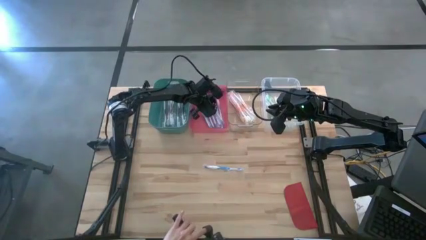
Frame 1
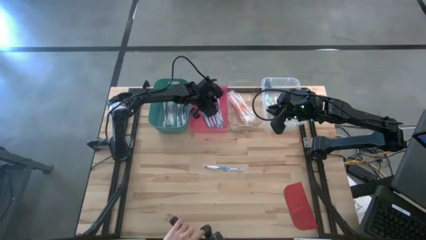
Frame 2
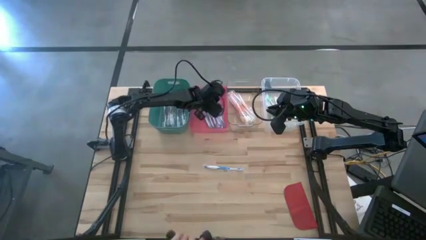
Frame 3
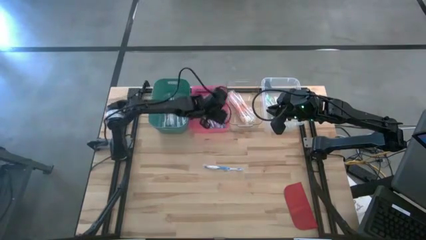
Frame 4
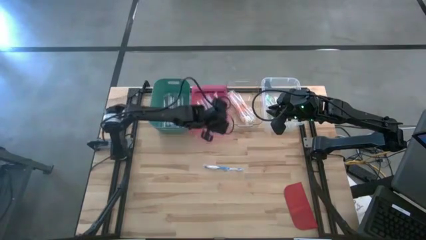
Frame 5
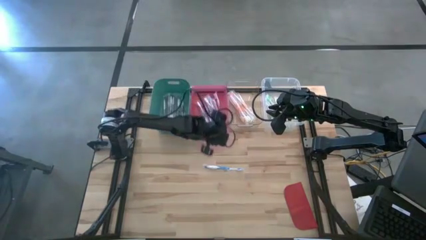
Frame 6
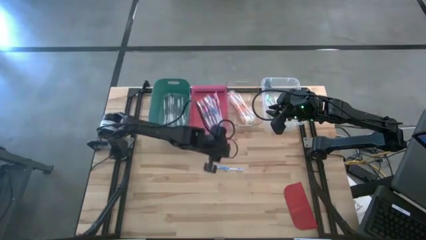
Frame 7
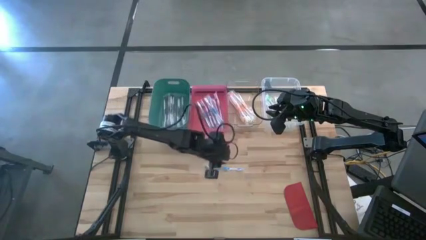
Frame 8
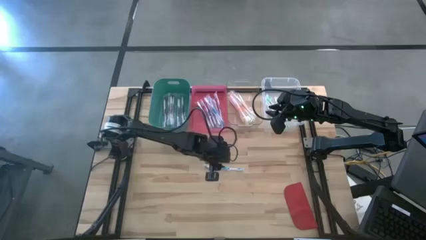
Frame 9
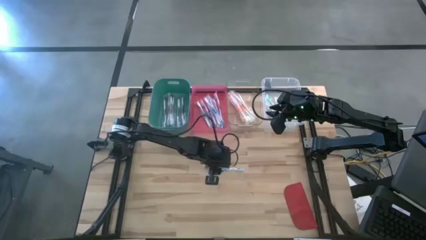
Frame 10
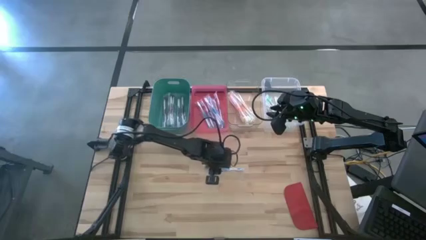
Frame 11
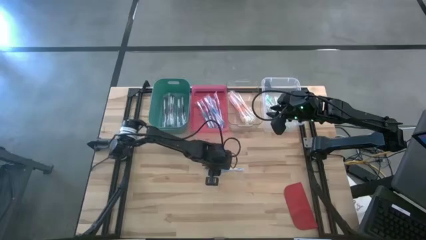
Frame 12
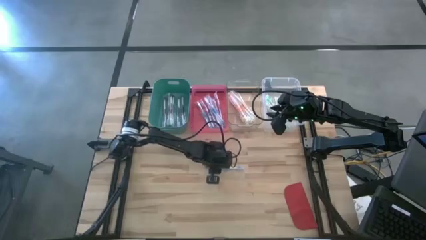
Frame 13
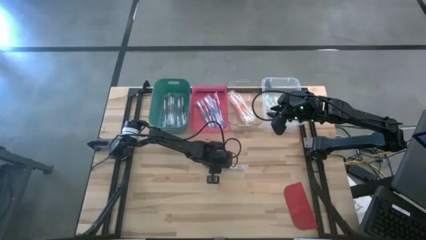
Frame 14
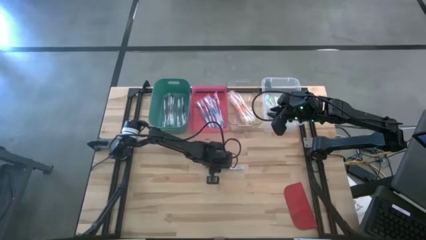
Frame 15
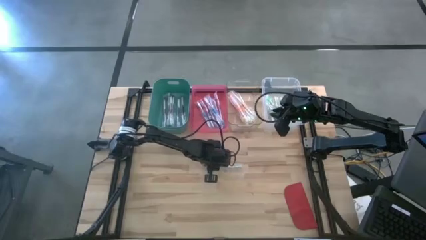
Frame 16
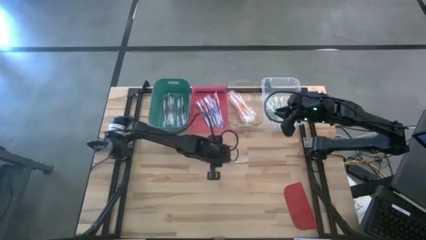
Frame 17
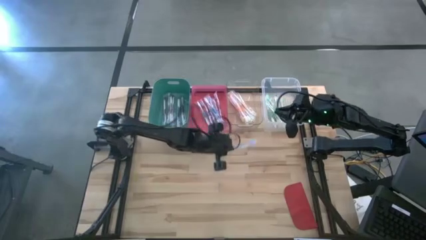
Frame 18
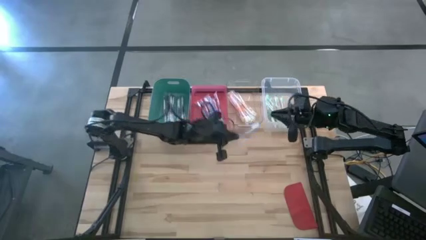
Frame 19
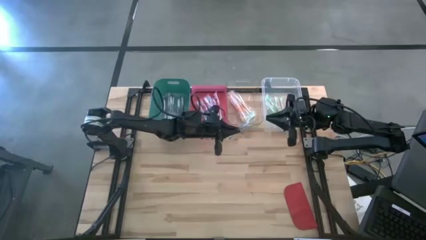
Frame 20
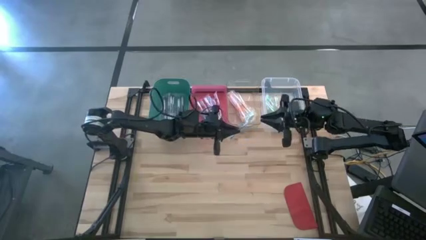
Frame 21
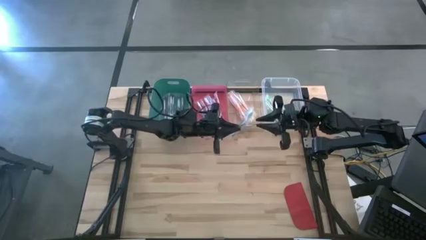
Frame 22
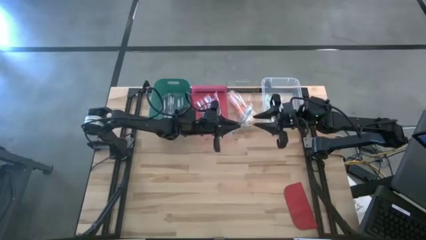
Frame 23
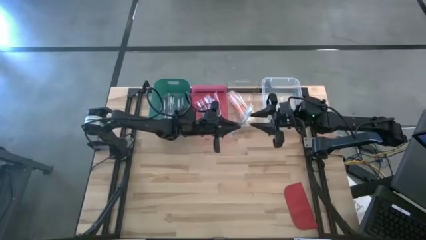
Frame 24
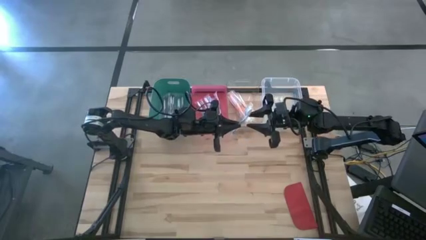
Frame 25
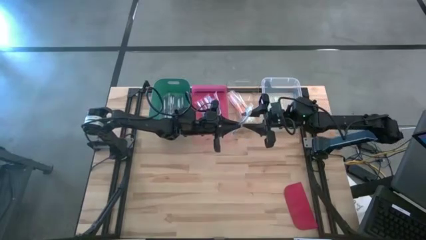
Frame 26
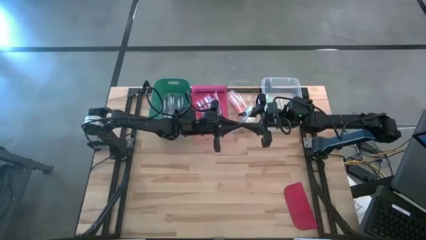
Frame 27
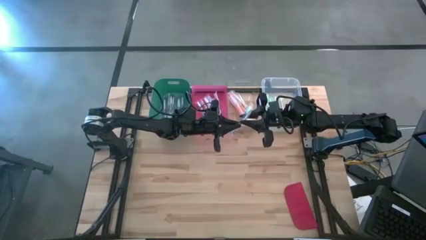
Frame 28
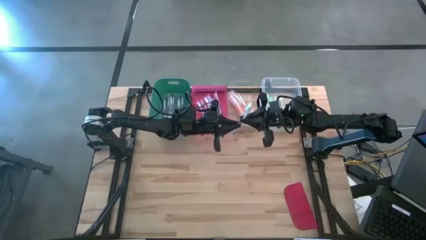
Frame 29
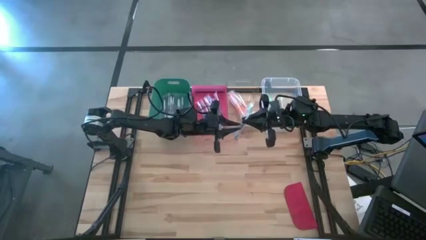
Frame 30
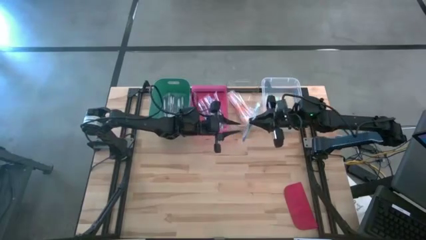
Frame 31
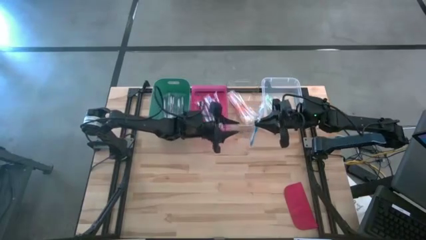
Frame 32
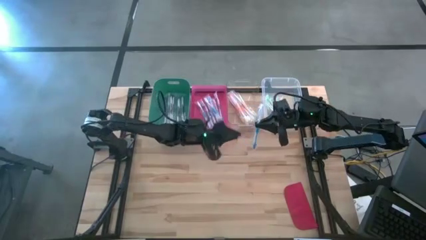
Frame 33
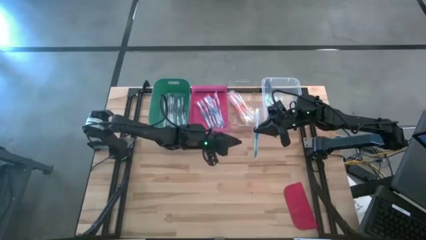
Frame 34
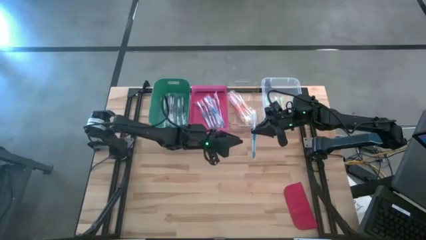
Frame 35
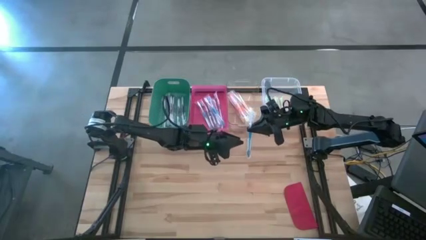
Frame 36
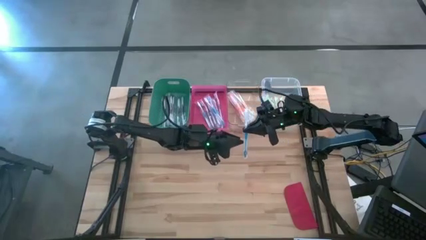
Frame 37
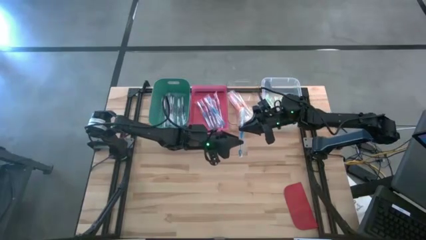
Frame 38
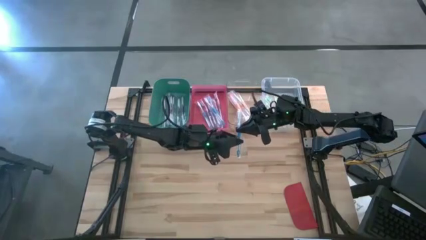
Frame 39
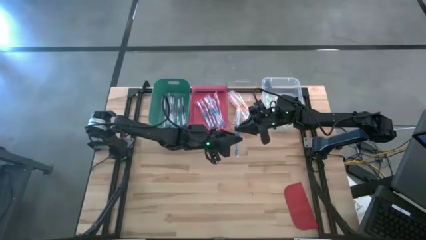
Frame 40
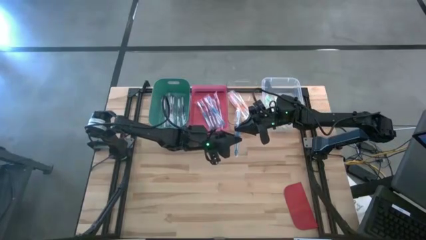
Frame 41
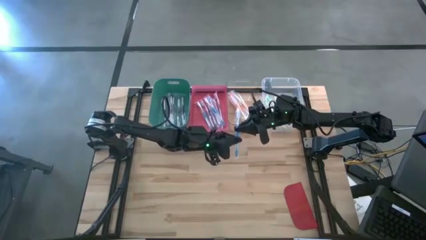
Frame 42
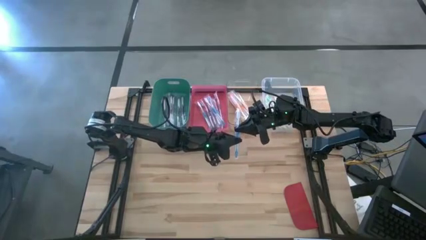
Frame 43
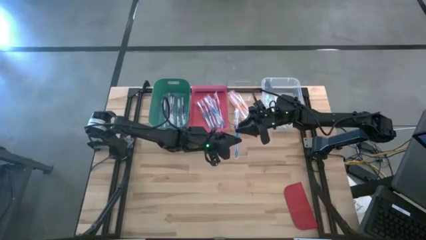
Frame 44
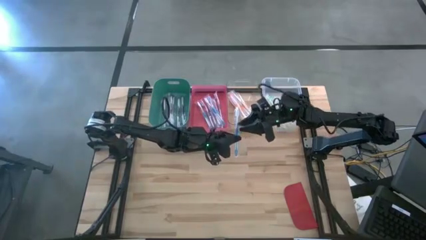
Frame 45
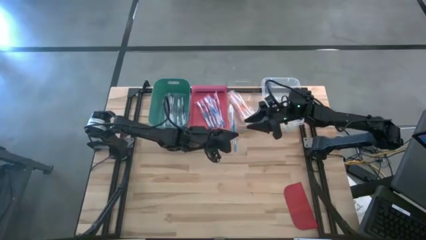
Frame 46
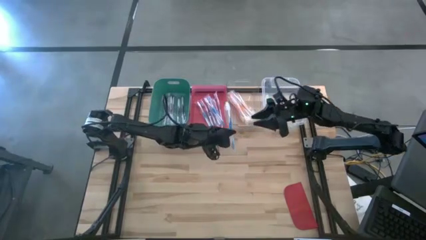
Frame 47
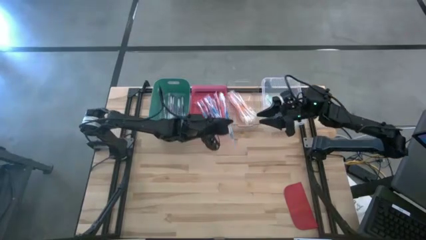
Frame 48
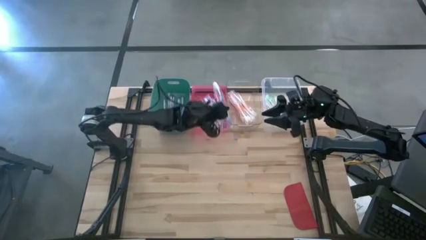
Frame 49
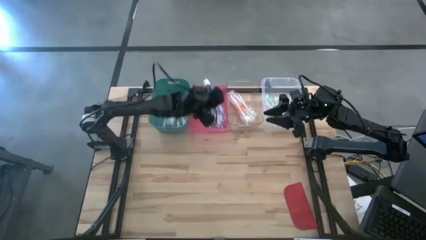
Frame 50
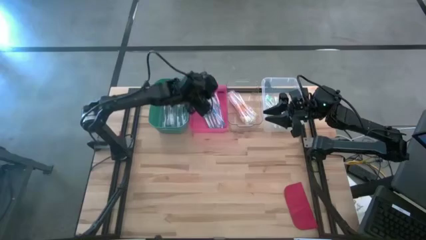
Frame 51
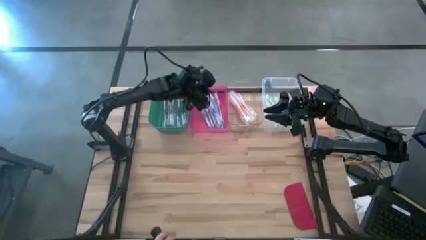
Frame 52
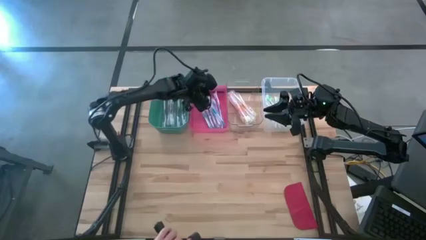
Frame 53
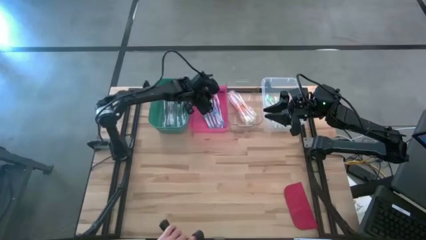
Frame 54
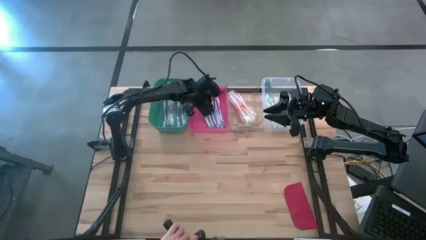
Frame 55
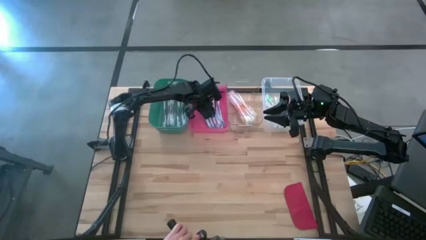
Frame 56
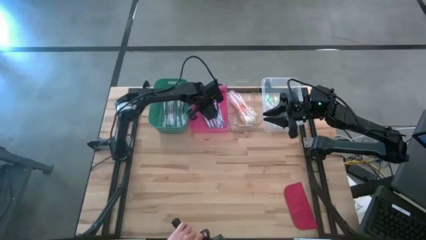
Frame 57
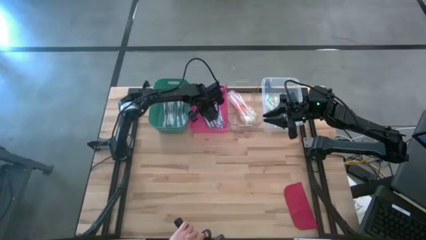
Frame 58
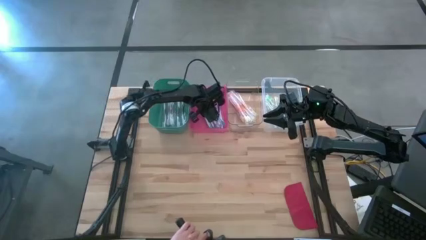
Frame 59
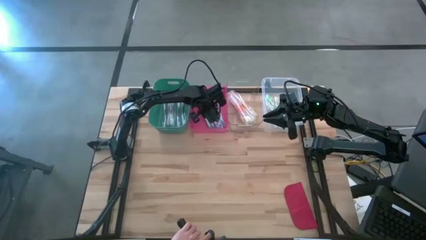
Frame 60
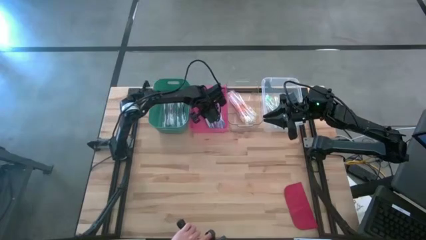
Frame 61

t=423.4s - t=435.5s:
Task: Pick & Place Toothbrushes
Put the blue toothbrush into the red bin

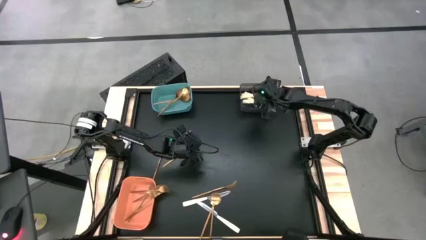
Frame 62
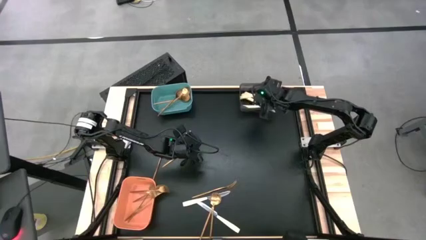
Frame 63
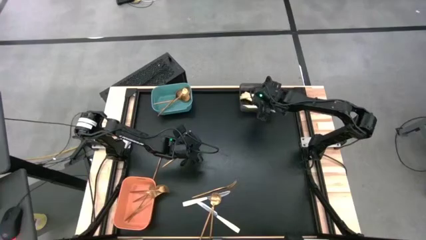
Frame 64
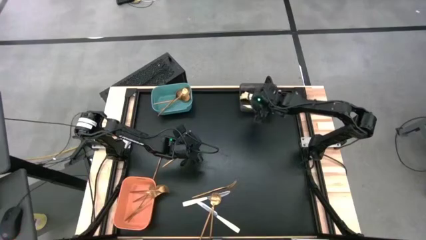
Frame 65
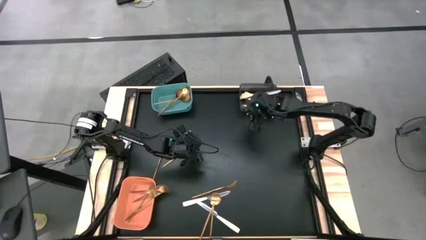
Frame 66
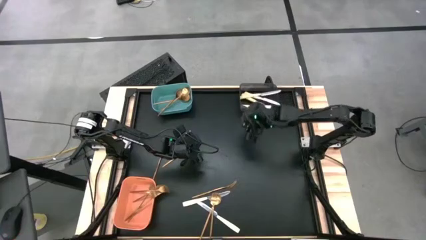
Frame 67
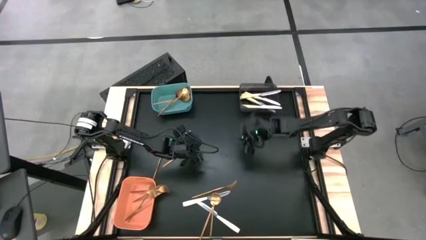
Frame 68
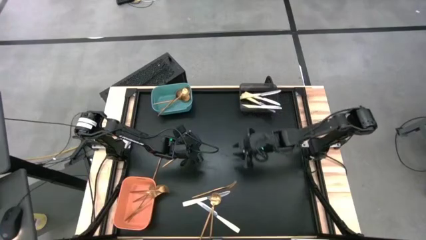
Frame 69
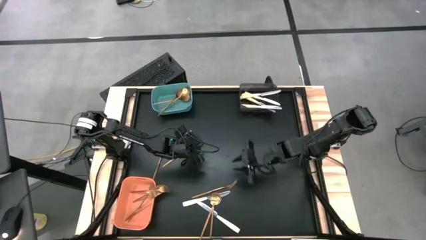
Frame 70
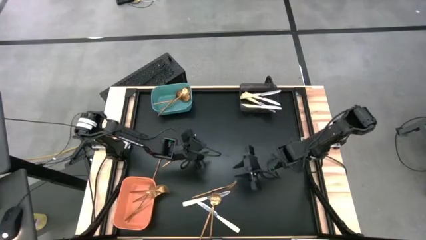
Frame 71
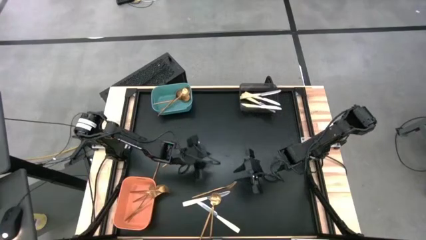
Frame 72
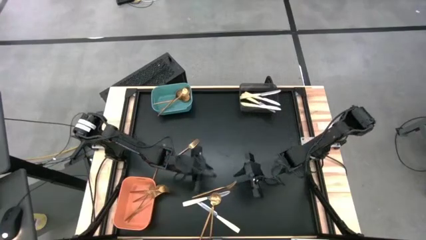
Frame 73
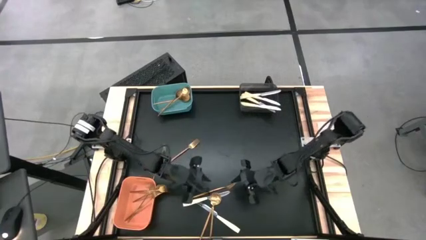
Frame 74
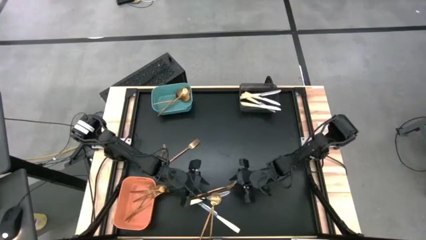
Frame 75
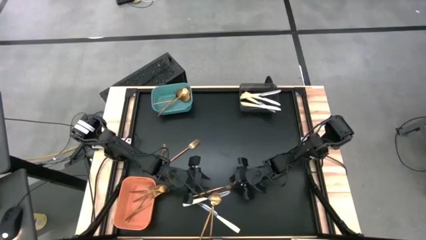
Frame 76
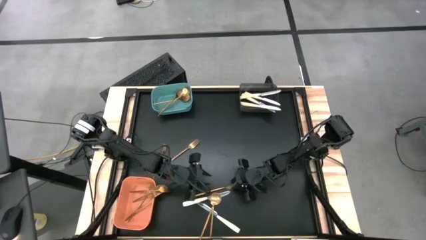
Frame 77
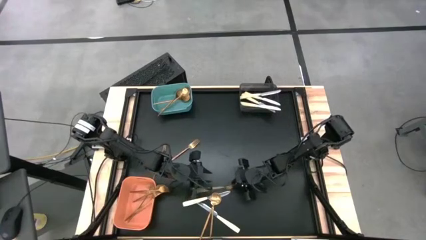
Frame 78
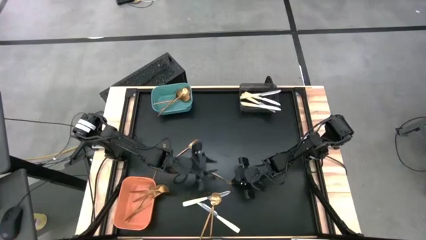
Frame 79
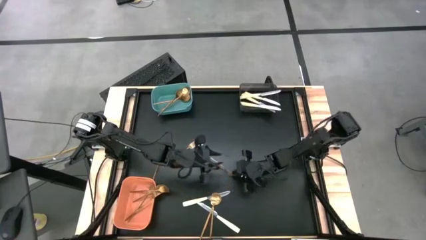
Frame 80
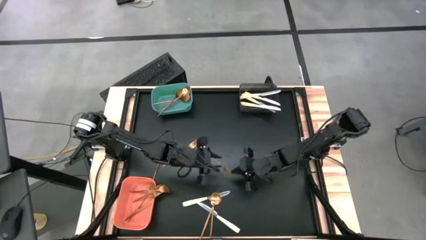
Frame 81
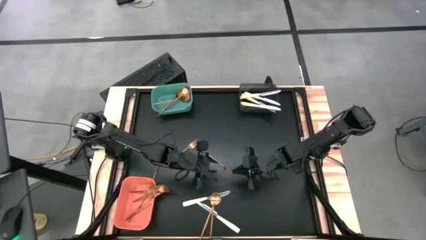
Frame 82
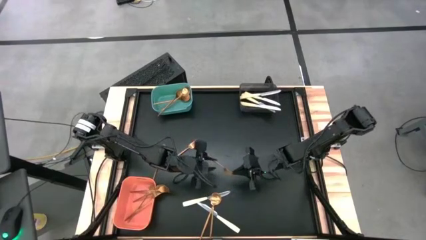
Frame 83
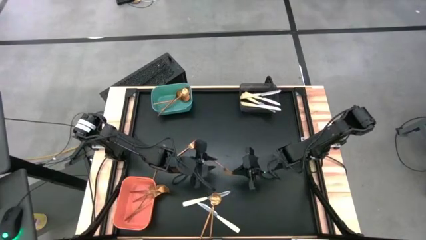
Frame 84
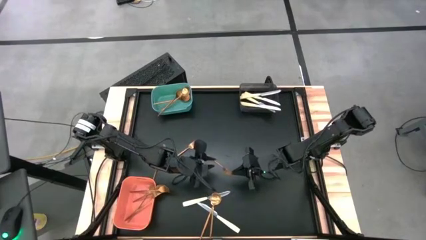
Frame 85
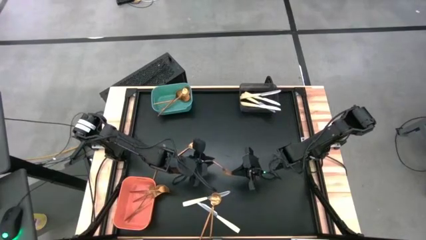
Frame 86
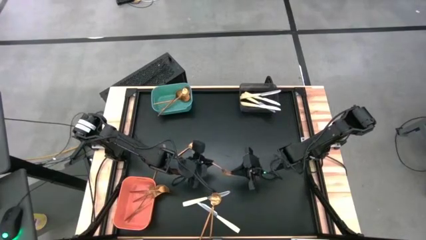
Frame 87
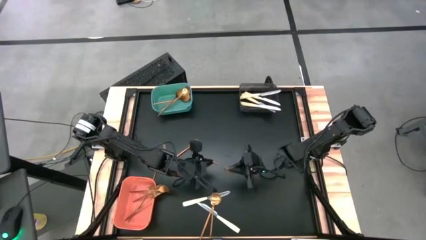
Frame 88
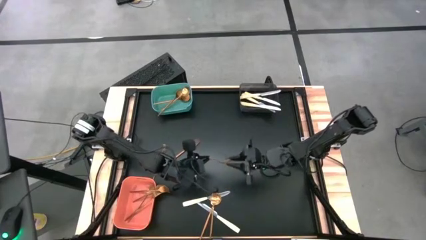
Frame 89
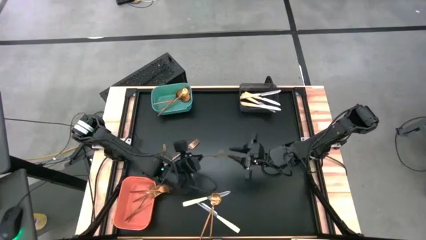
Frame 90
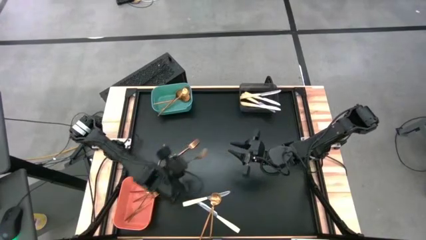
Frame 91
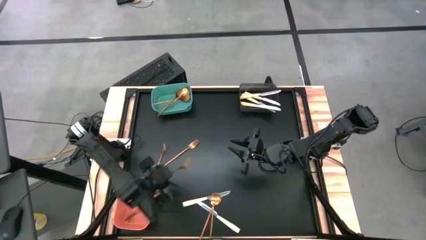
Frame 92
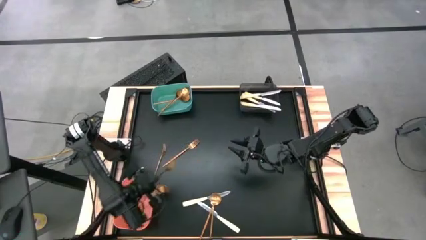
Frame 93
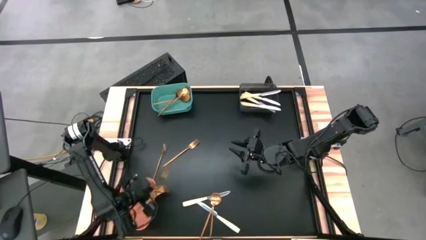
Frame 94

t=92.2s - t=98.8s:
Task: Sort silverware by color (type)
Put the gold fork into the orange bin
